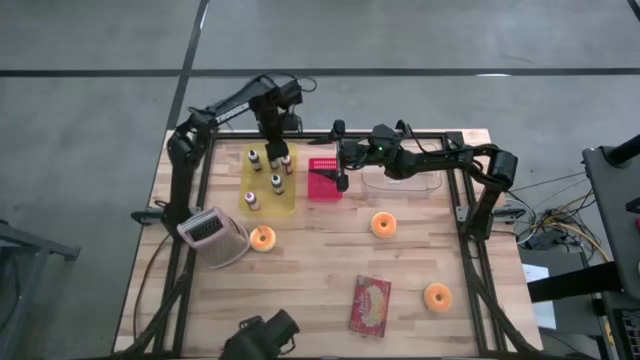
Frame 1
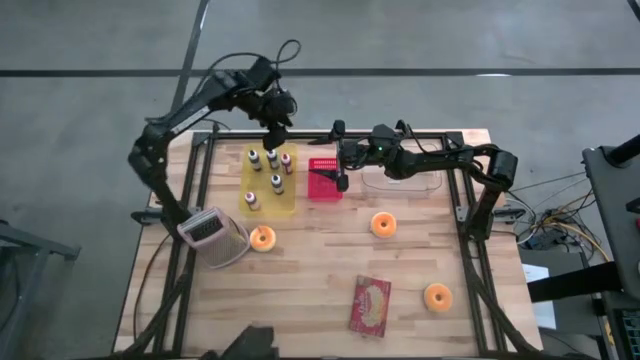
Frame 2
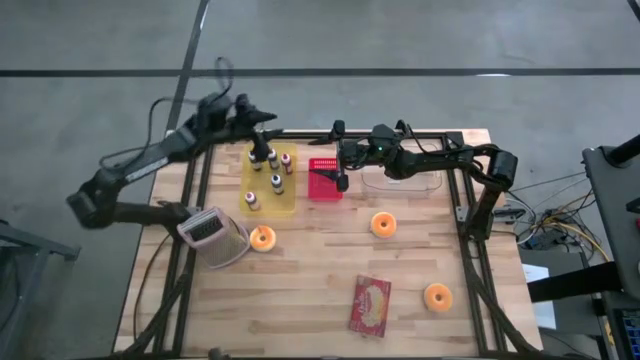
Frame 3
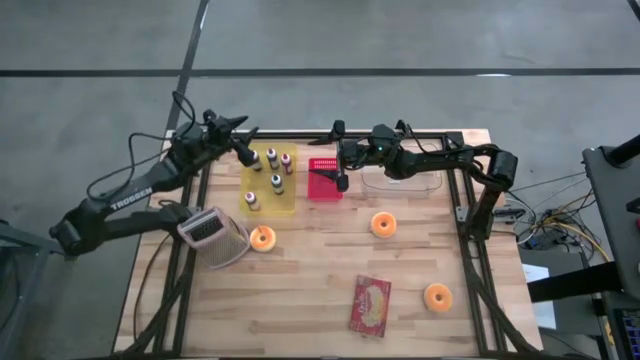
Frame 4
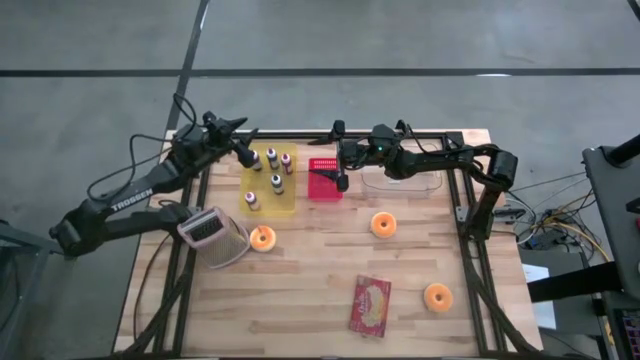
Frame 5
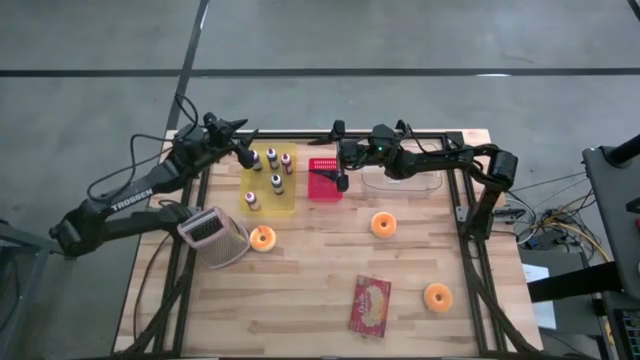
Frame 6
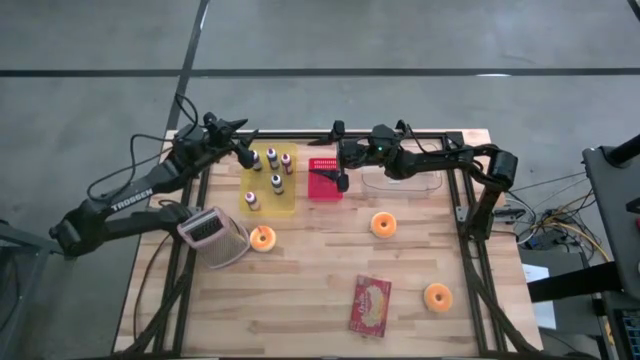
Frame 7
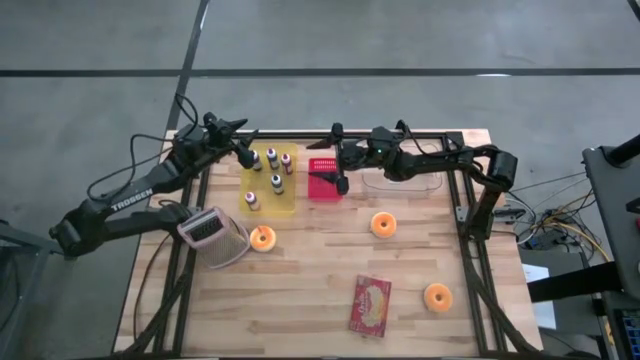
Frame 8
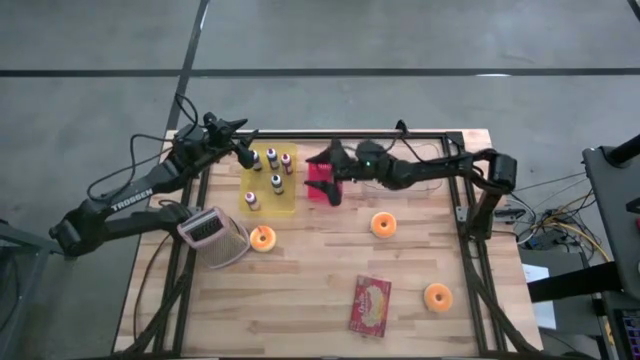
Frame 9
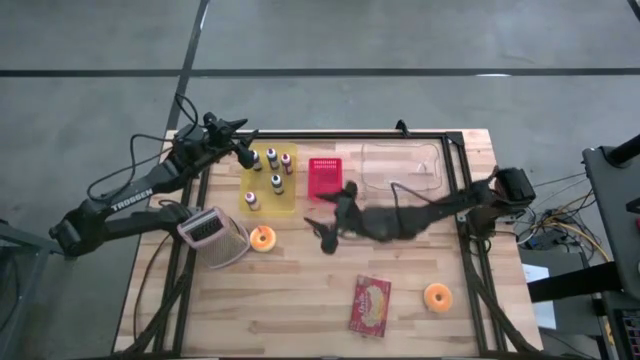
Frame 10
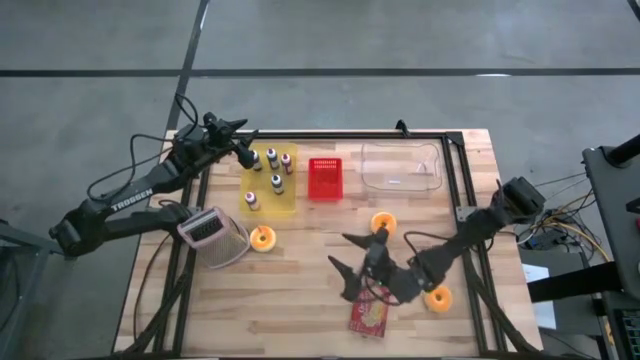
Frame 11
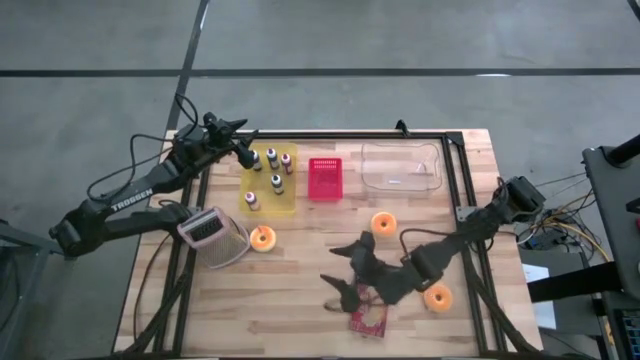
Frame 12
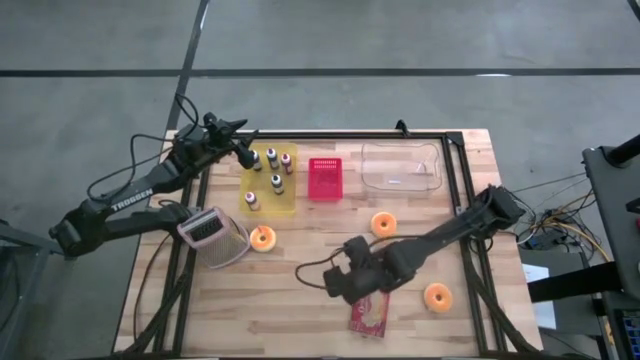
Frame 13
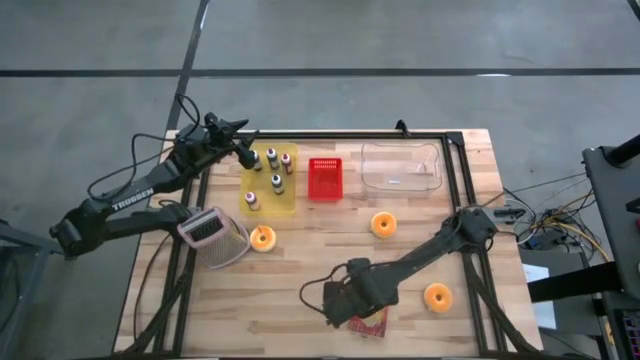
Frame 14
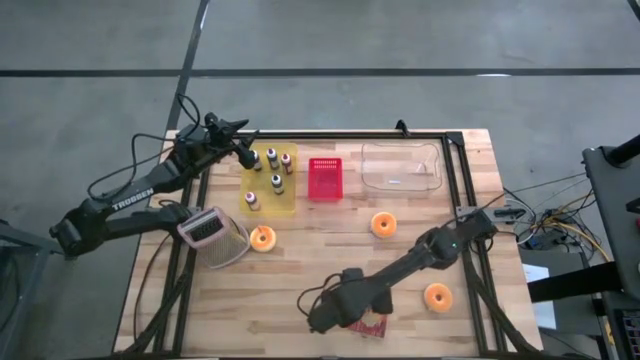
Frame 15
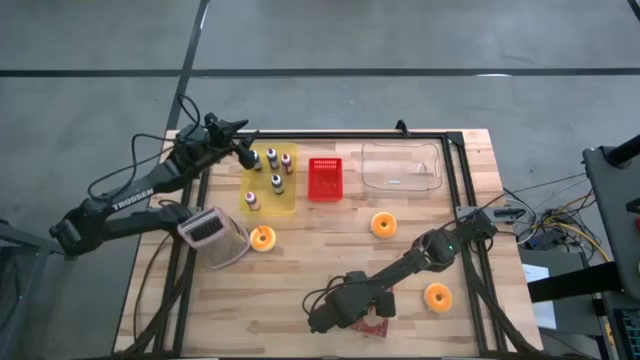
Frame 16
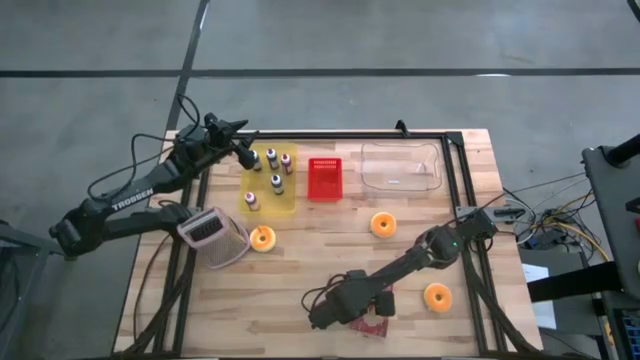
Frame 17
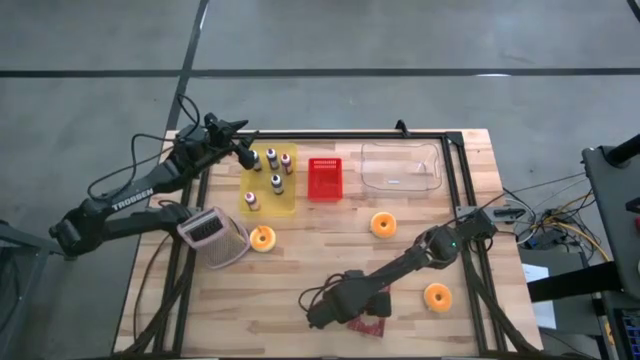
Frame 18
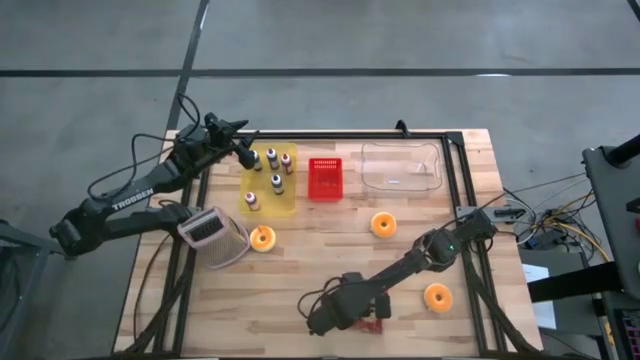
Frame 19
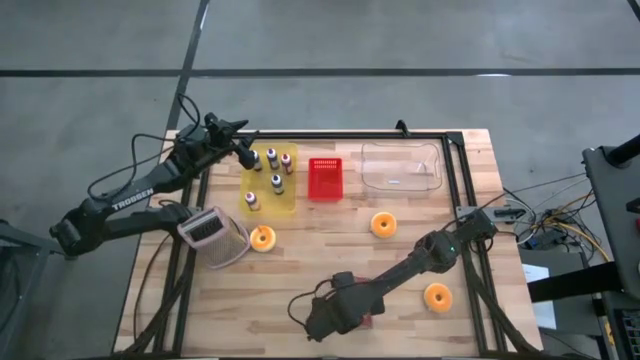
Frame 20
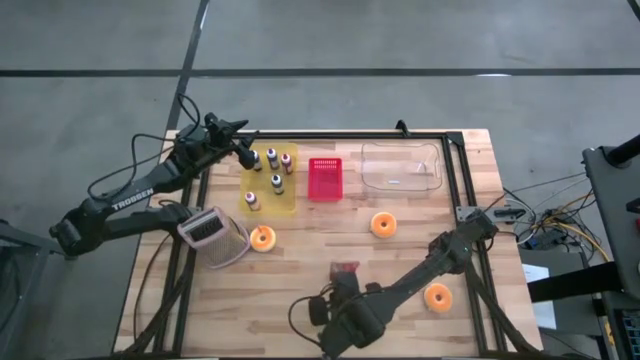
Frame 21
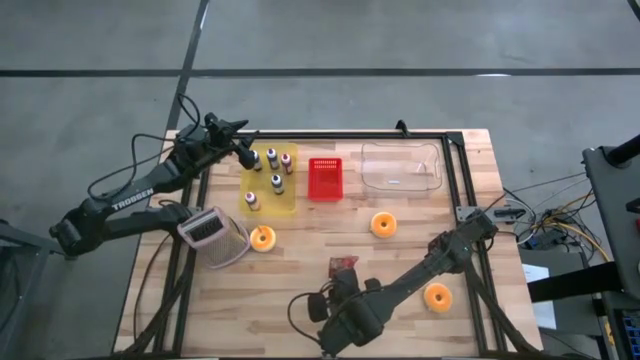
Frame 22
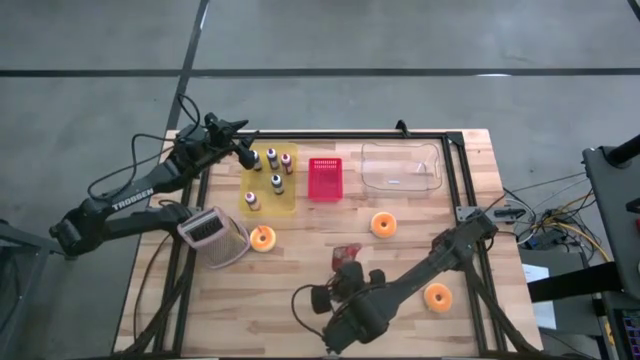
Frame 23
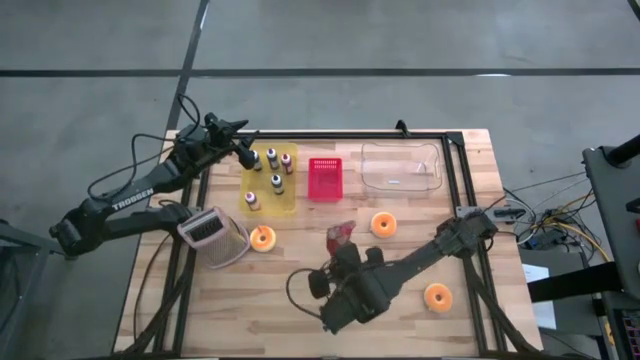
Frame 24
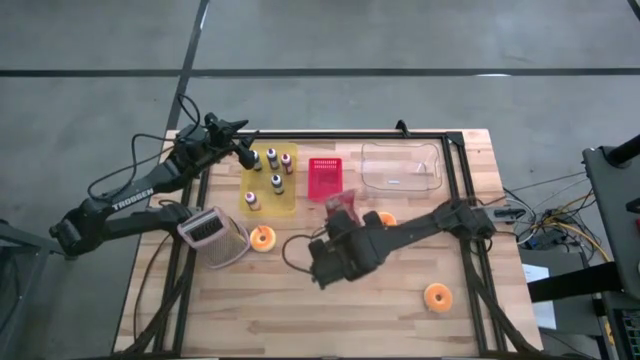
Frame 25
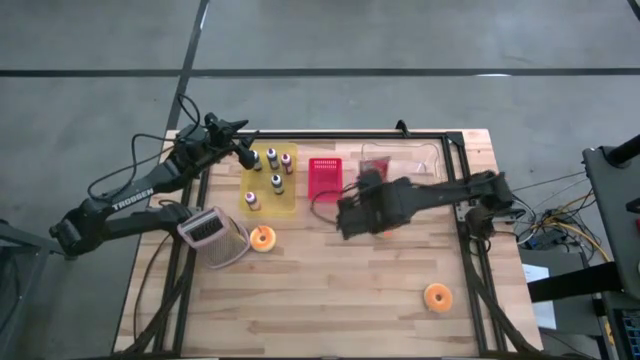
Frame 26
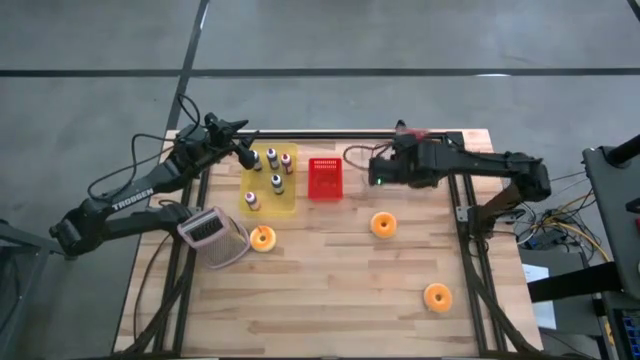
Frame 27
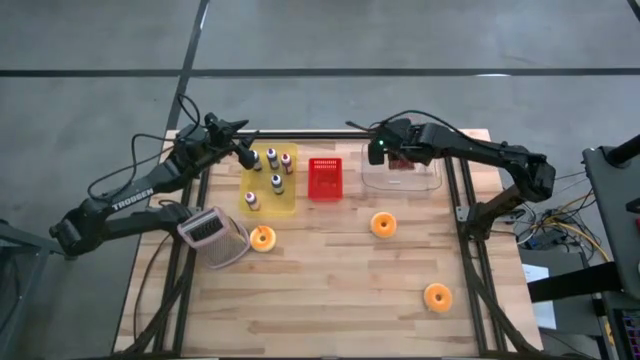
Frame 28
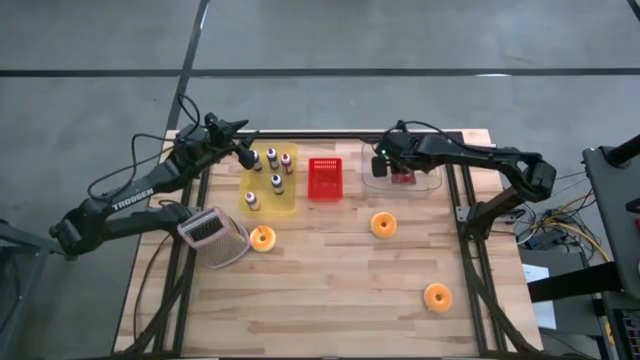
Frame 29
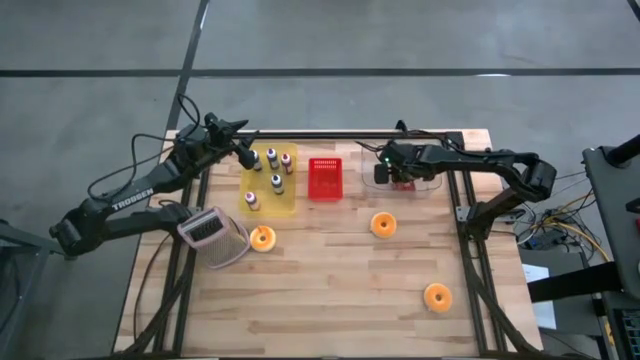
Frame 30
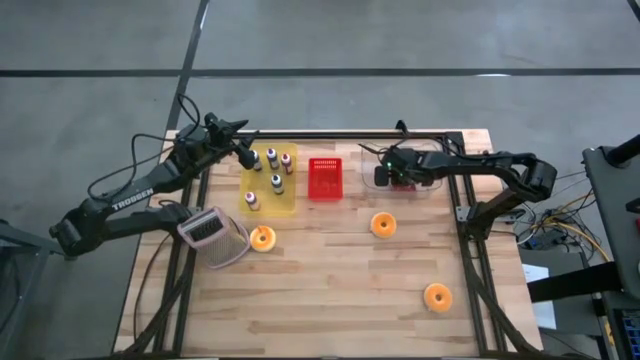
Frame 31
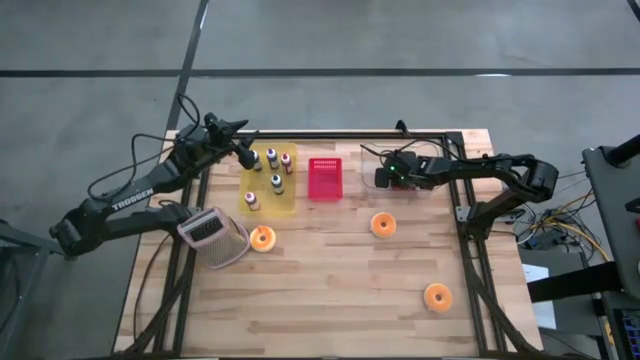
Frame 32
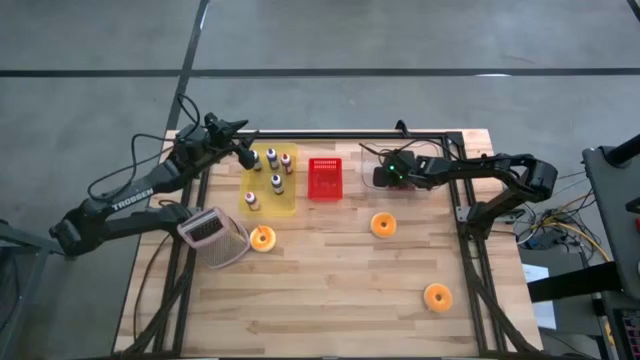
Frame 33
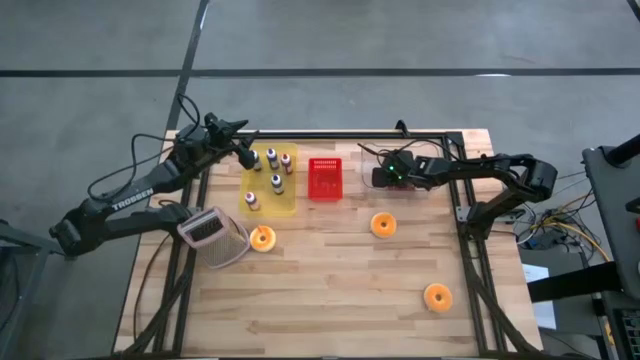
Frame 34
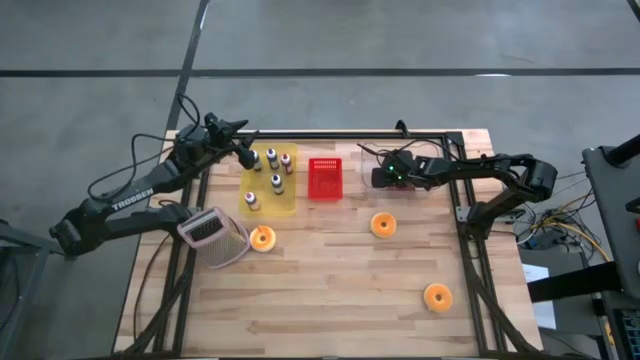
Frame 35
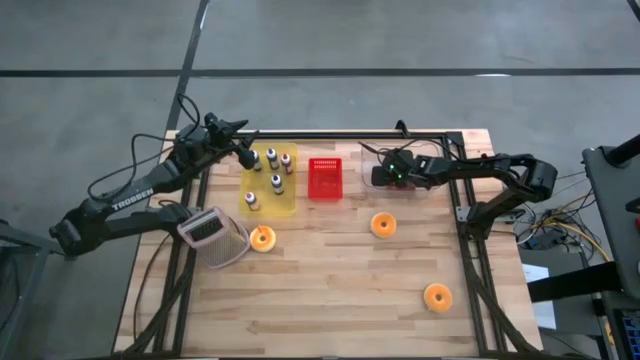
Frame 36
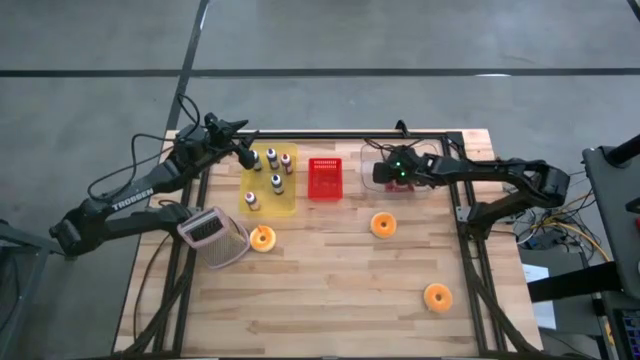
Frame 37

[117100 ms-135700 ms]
Task: Pick & Place Food Item
Put the red popcorn bag into the transparent bin

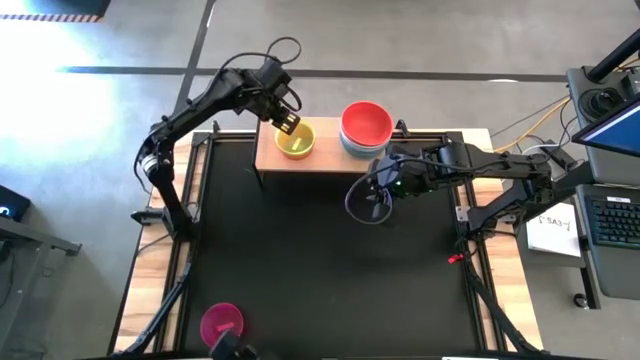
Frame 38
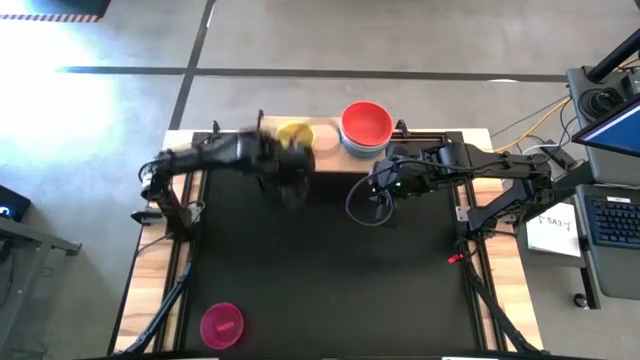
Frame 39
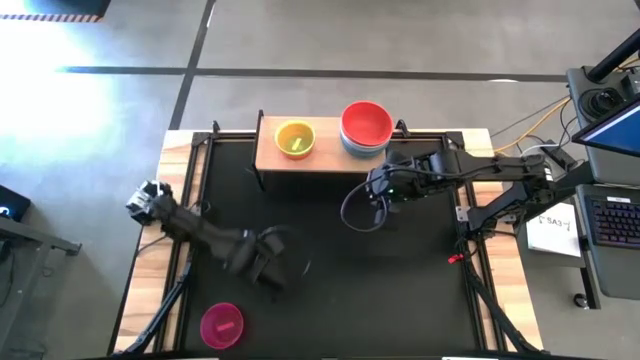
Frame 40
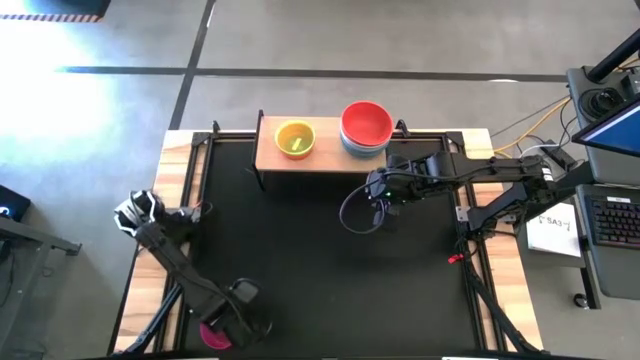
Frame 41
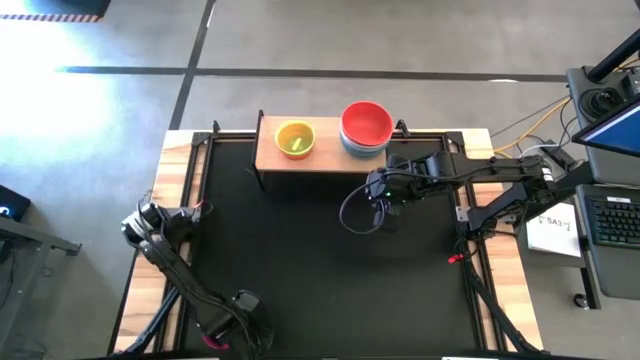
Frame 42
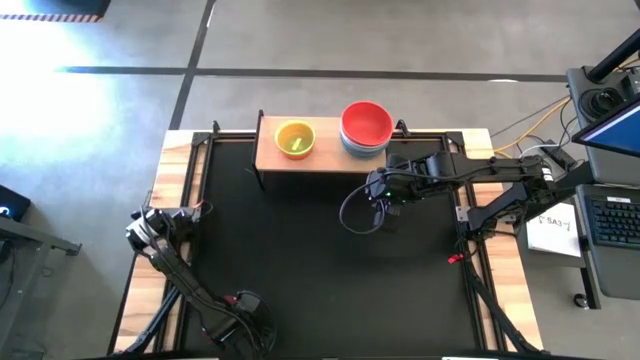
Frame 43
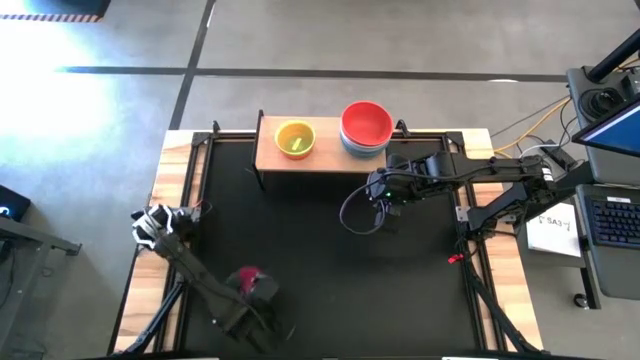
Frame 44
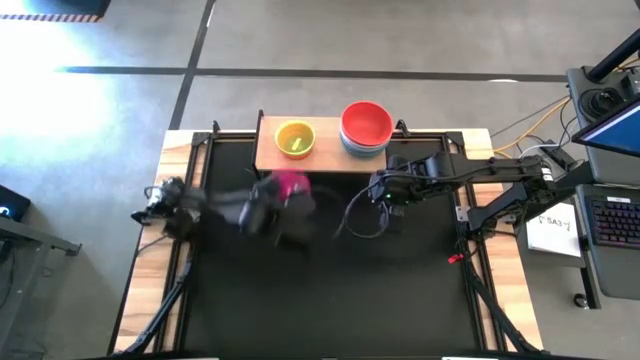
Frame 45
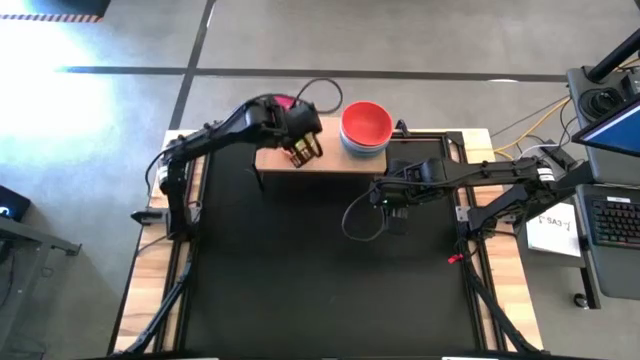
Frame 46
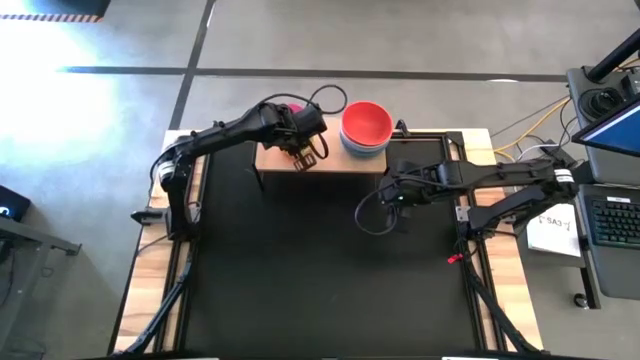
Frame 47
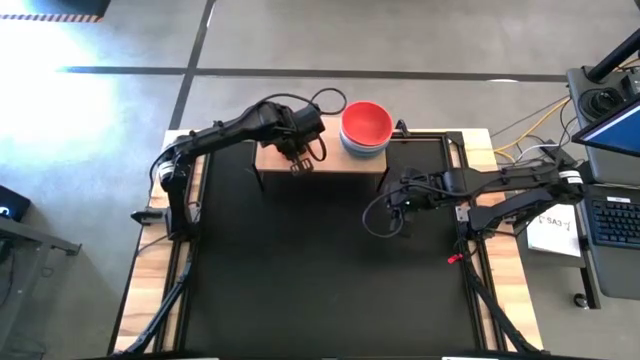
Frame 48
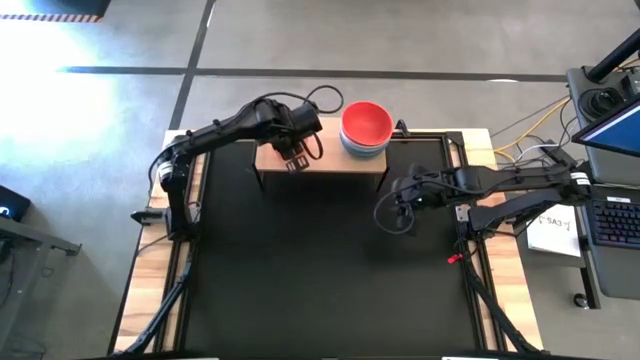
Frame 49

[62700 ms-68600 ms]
Task: Place and stack bowls onto a shelf
Stack the pink bowl on top of the yellow bowl on the shelf
